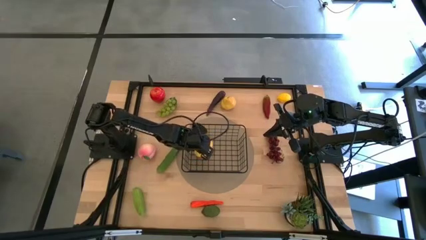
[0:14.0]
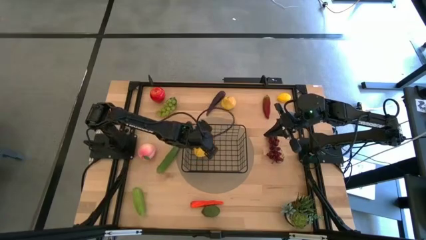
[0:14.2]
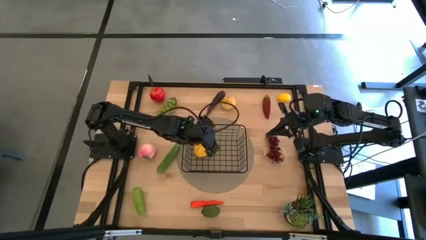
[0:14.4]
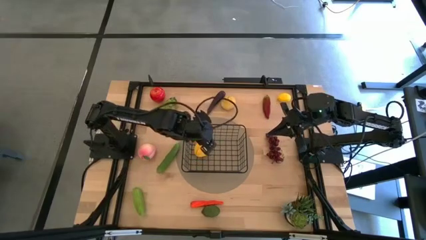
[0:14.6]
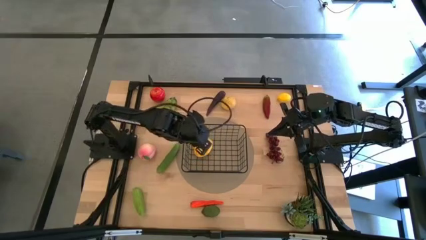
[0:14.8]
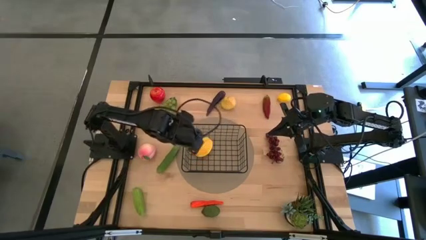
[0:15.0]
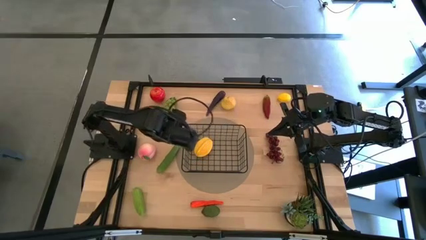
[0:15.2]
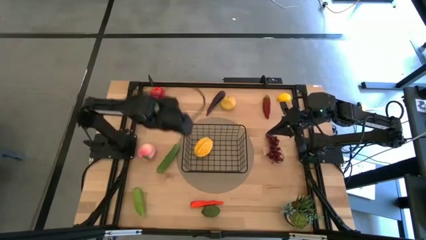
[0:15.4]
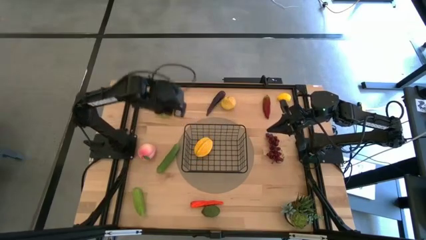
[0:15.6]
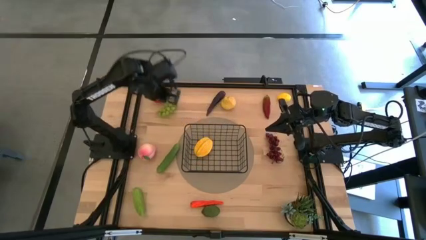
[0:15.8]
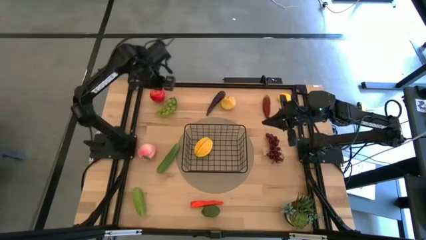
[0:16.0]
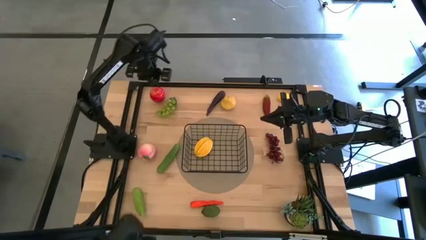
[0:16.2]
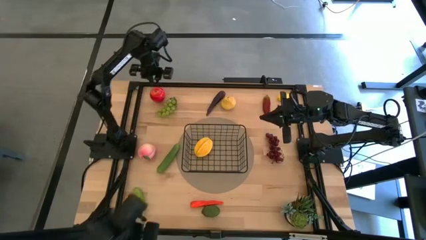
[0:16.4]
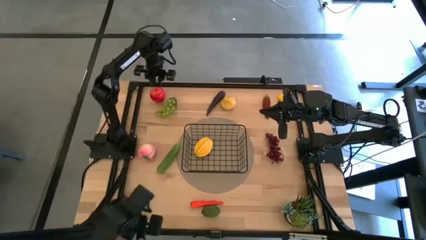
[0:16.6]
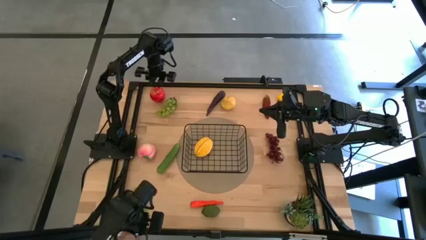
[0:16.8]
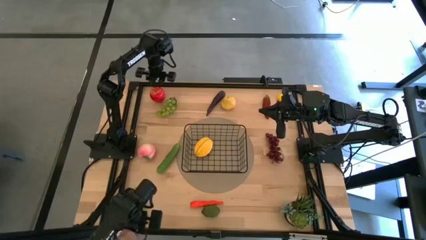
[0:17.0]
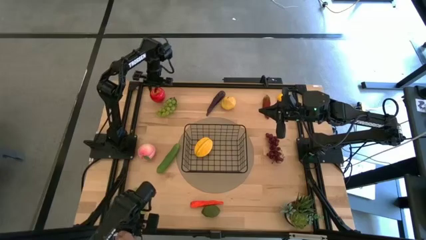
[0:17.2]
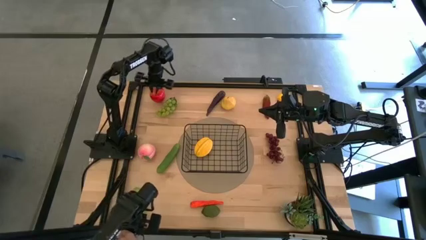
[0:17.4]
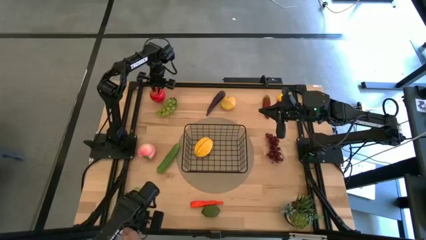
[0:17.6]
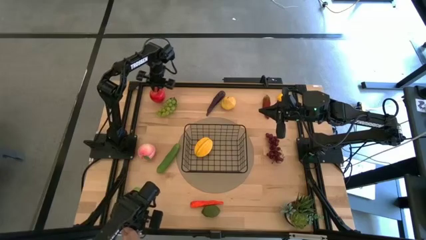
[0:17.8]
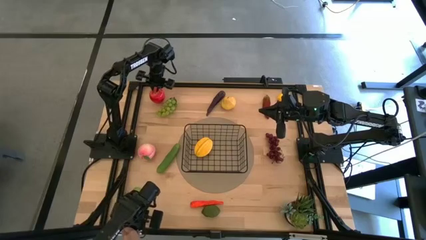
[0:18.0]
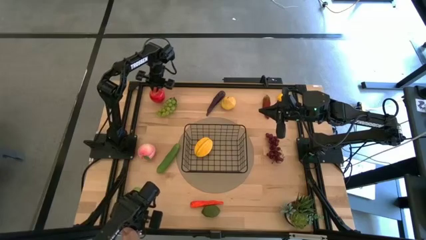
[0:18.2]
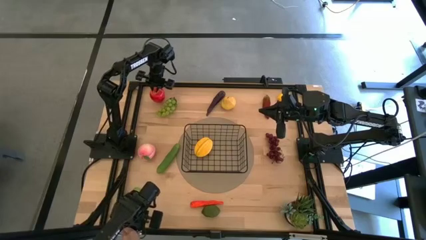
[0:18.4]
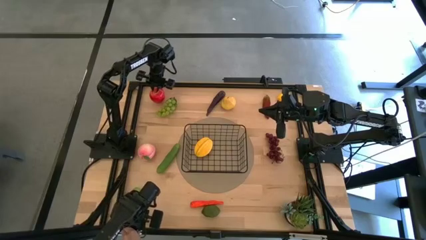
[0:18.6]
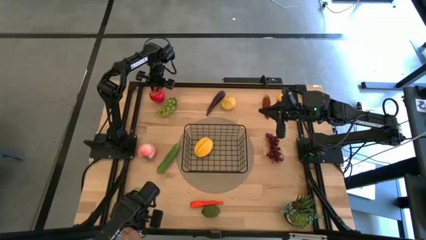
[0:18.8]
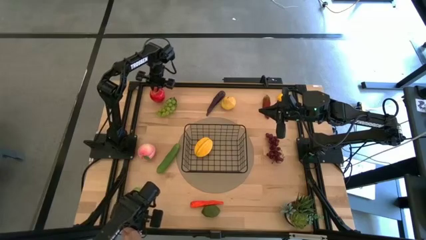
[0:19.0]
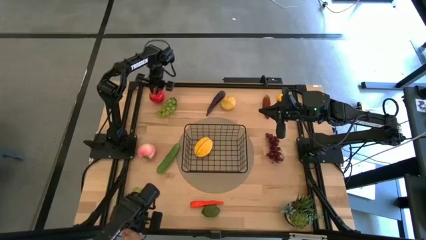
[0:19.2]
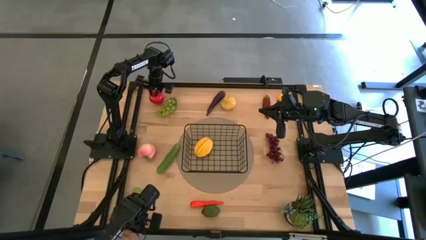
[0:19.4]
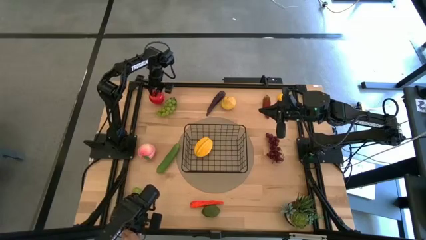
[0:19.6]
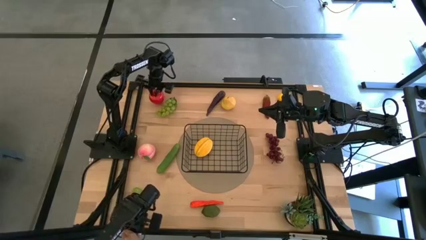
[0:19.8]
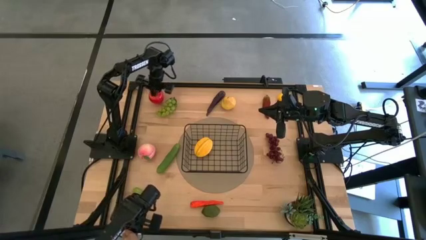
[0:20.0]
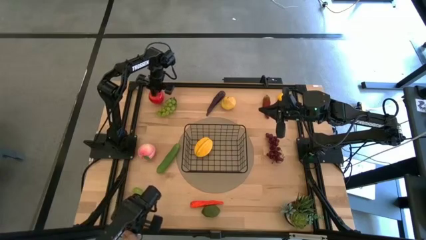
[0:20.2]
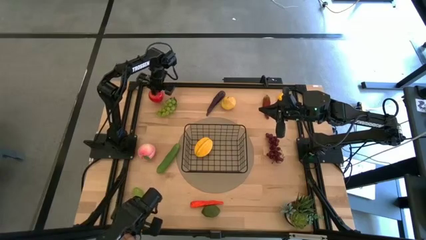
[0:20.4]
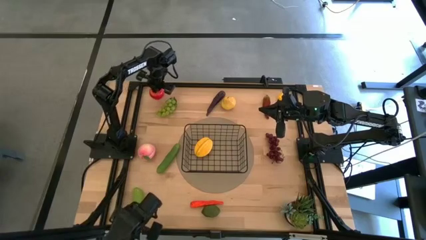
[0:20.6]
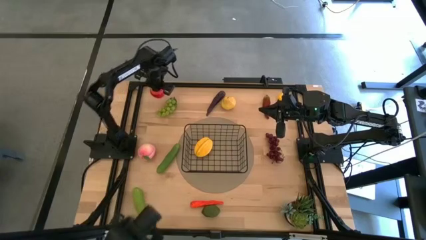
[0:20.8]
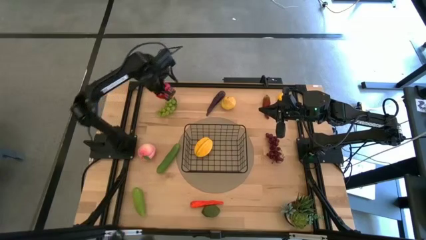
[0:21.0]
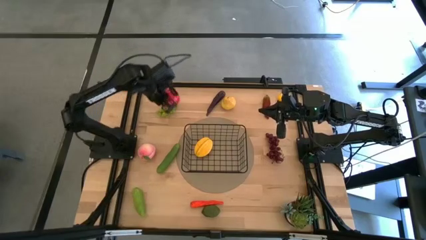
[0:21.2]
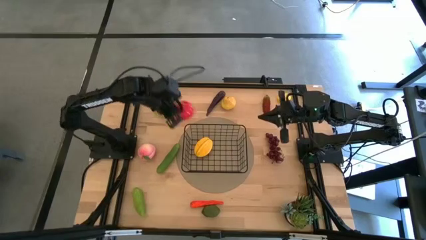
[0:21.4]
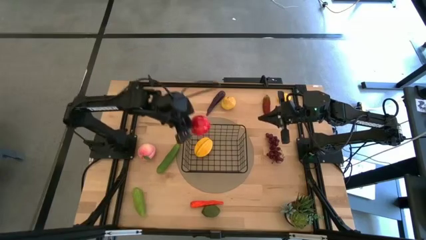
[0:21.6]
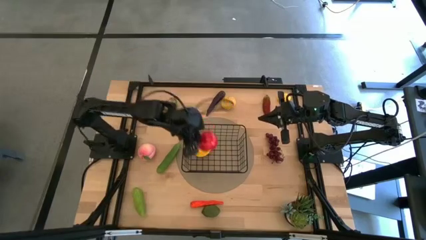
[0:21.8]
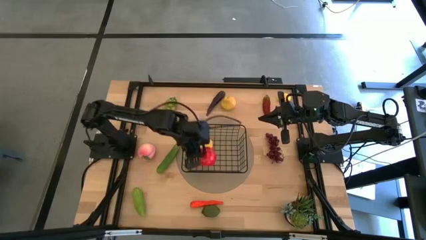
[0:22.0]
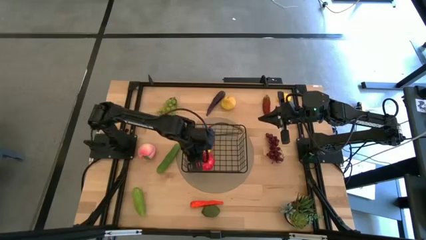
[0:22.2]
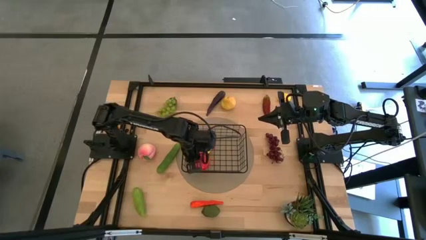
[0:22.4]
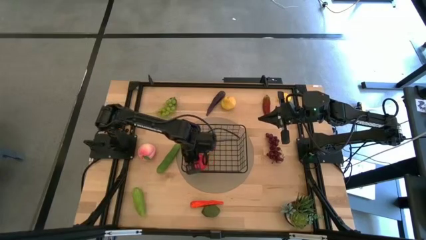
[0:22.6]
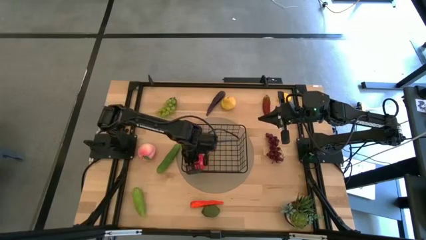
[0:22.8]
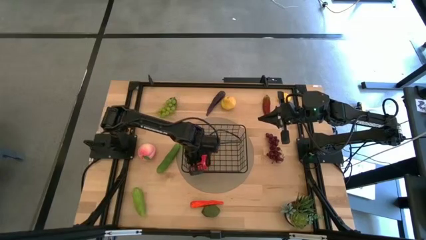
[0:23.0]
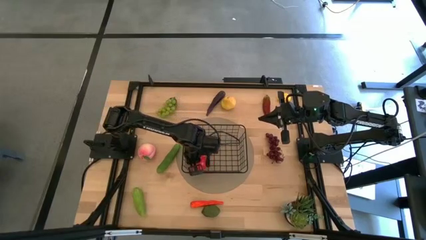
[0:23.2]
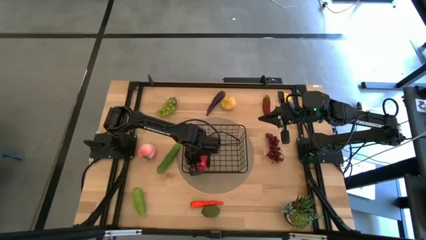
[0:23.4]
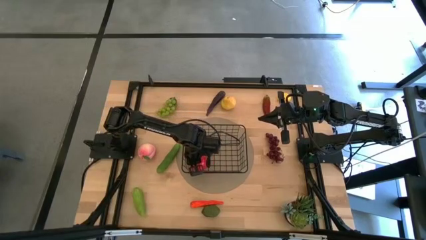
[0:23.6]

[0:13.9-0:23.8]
Task: Build produce basket
Put the red apple into the black wire basket

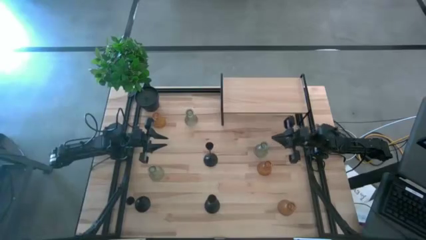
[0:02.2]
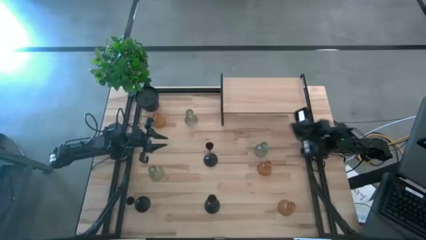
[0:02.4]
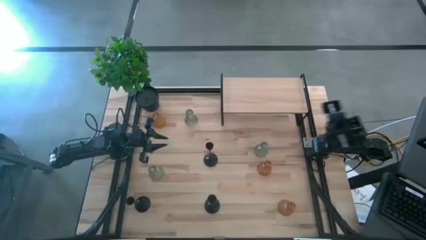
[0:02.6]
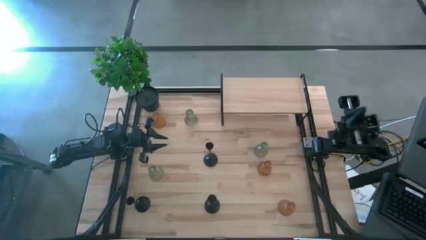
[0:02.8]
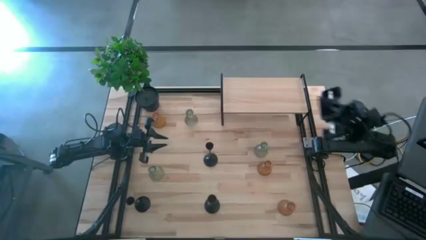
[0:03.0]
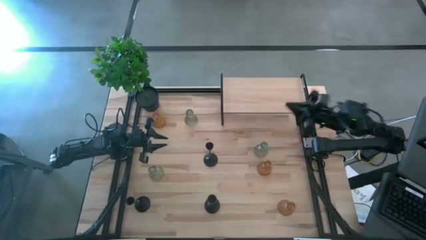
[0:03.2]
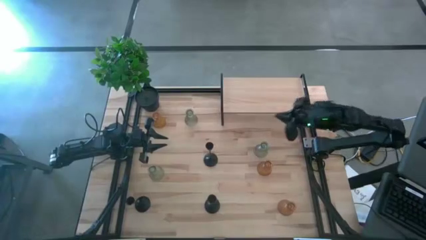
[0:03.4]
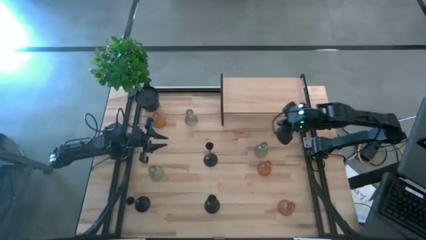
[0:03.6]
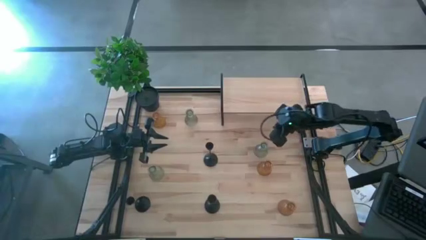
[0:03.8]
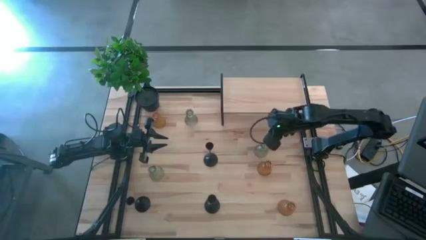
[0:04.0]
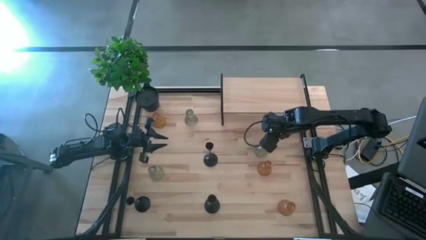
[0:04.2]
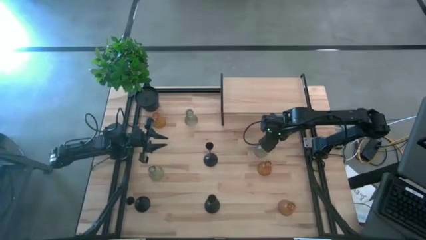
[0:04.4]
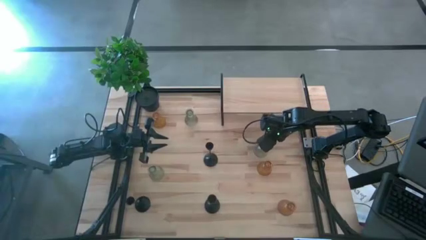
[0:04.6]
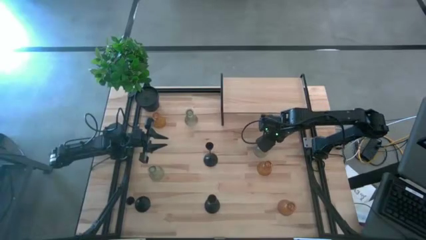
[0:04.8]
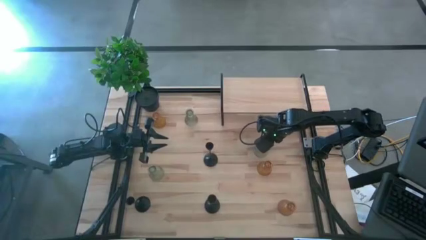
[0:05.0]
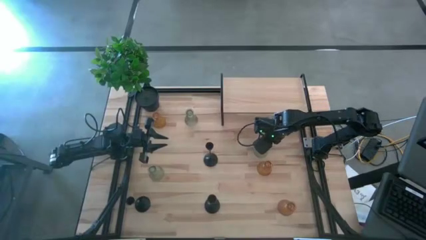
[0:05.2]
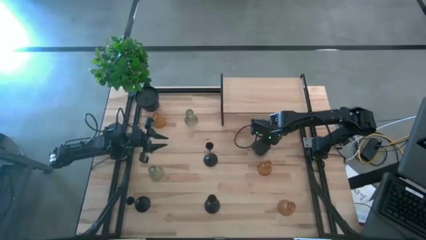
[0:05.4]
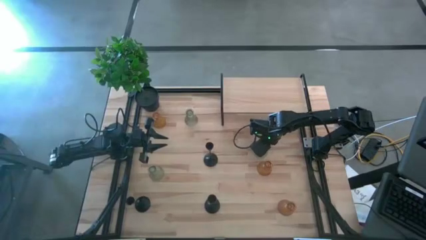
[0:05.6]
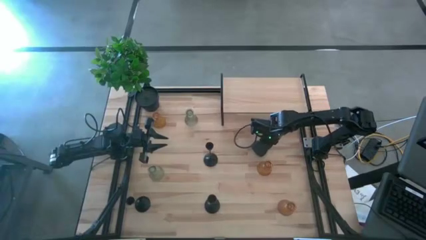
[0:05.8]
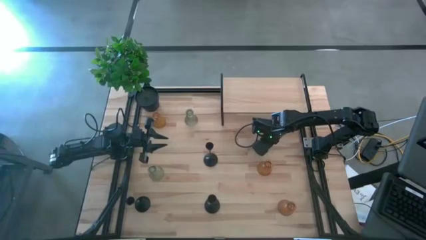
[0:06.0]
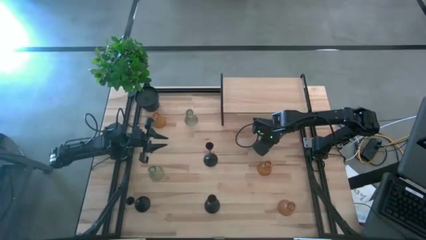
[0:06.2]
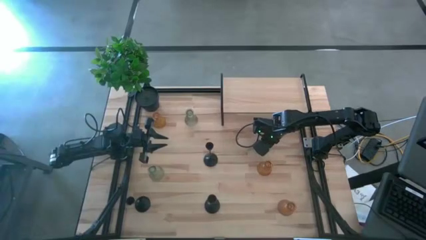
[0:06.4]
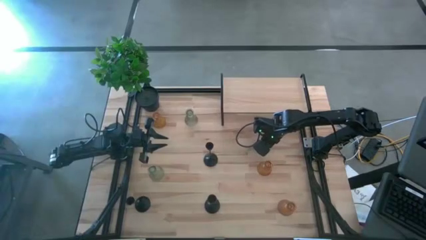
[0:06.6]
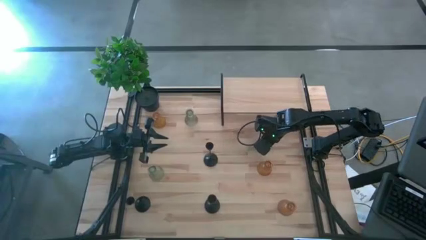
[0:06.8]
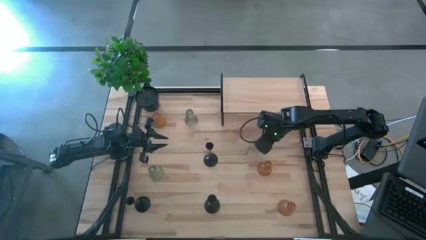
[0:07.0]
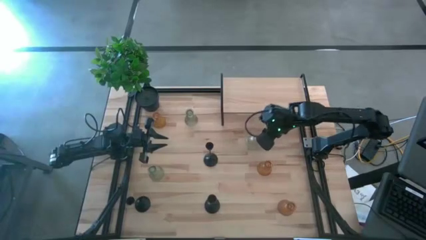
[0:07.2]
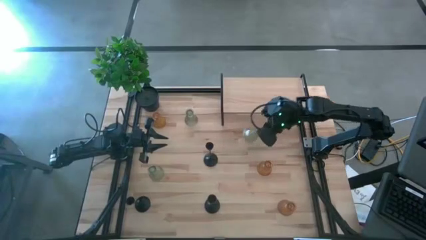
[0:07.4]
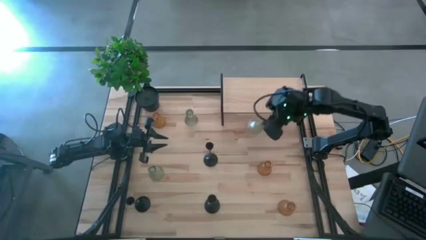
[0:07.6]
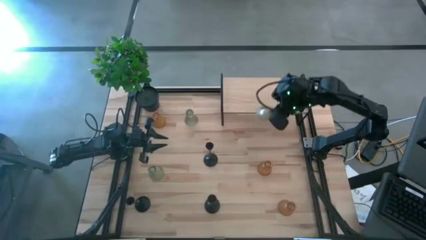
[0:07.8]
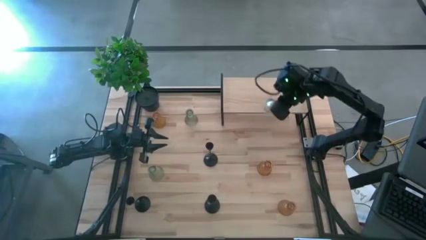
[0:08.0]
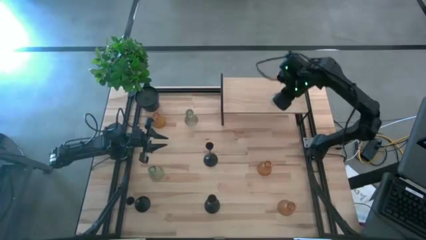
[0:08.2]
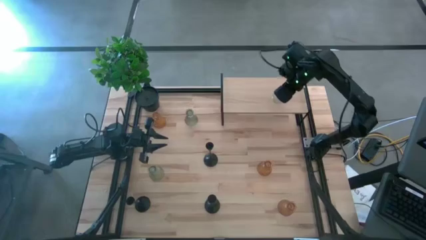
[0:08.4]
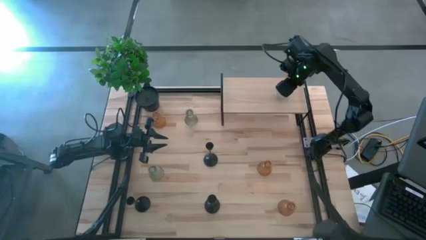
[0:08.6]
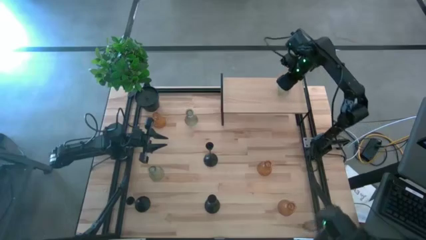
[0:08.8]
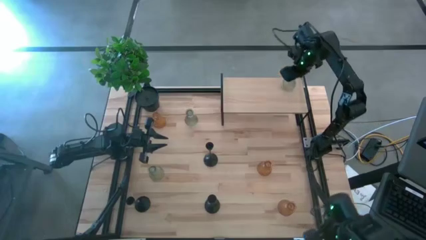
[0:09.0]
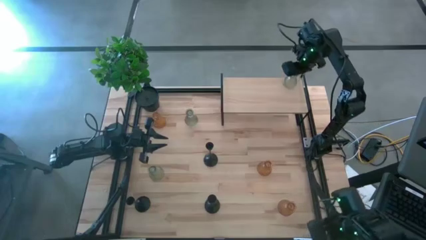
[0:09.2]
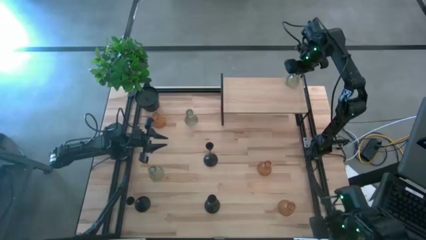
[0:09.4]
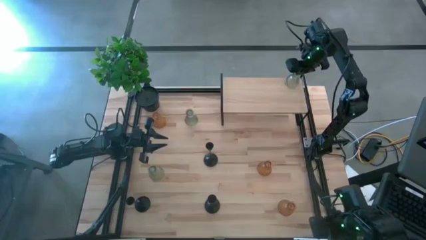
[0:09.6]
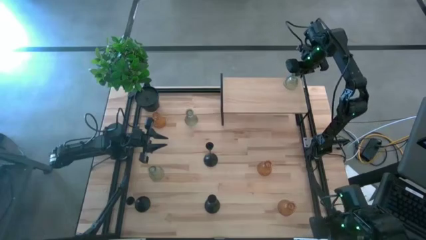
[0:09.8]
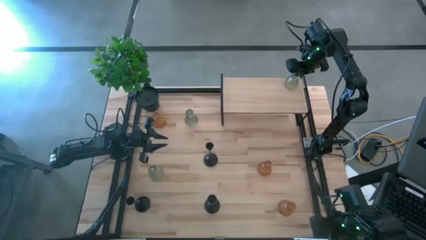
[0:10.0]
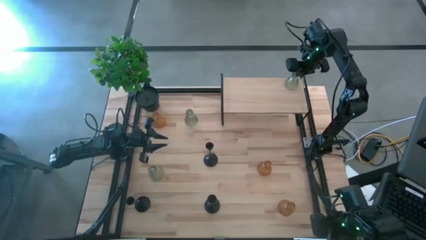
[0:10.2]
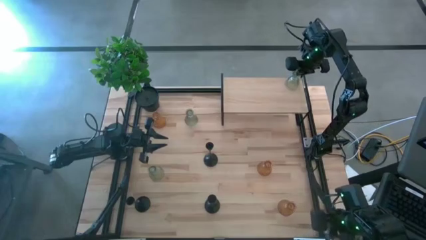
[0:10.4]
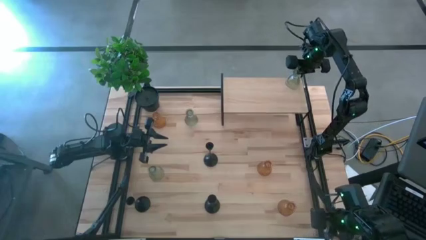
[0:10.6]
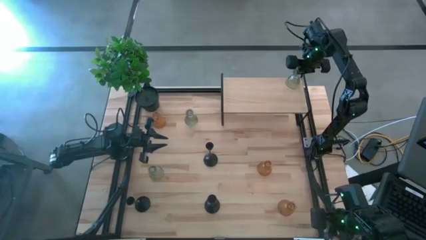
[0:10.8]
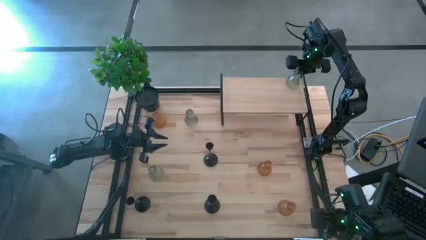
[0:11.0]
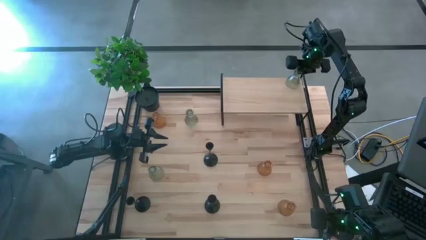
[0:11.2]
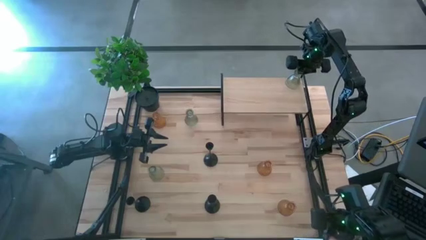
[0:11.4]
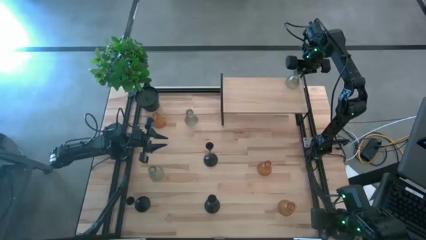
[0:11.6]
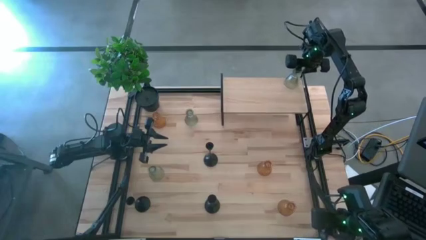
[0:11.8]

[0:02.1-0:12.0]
Task: Pick & Place candle stick holders
Put the middle green glass candle holder on the shelf
